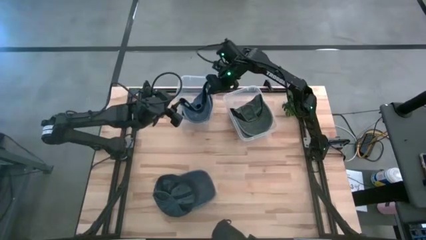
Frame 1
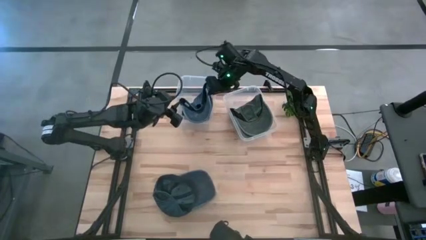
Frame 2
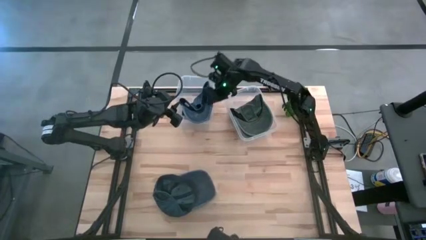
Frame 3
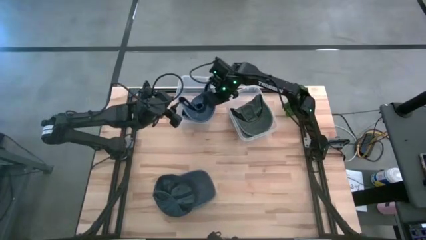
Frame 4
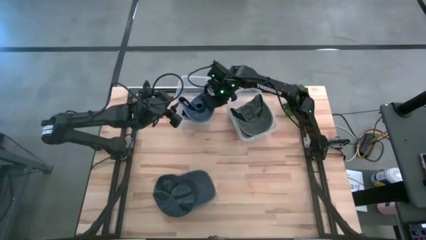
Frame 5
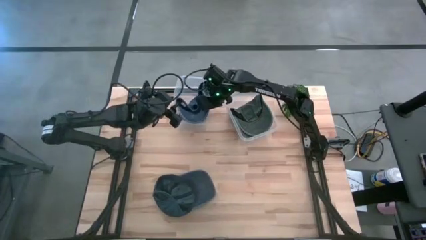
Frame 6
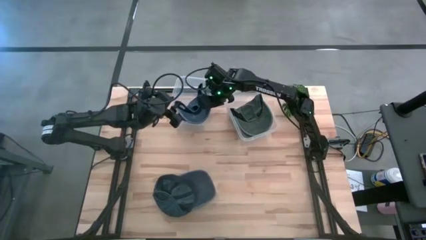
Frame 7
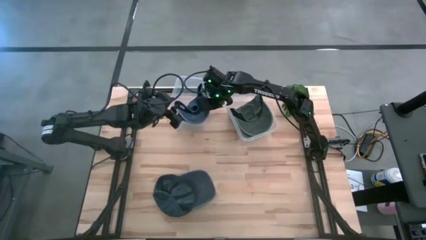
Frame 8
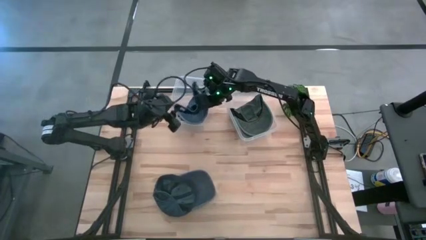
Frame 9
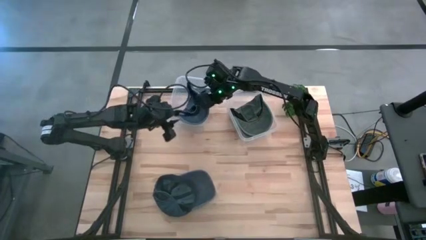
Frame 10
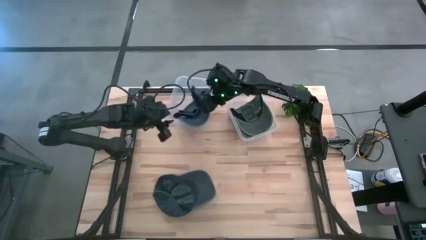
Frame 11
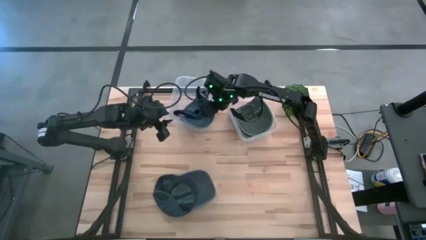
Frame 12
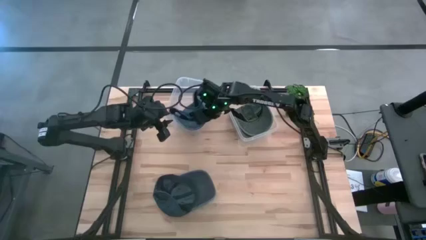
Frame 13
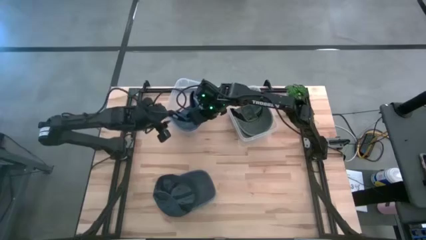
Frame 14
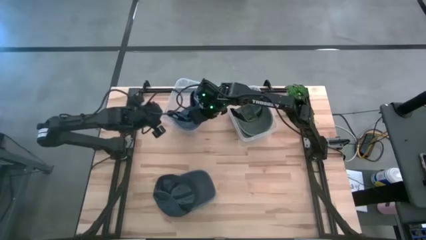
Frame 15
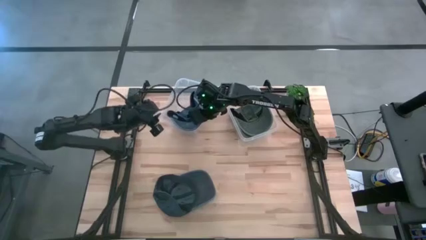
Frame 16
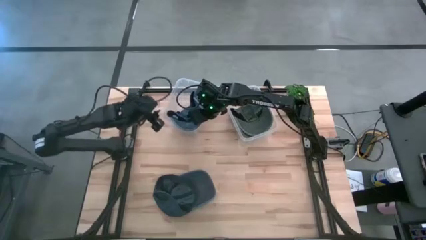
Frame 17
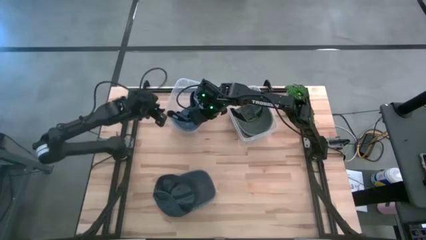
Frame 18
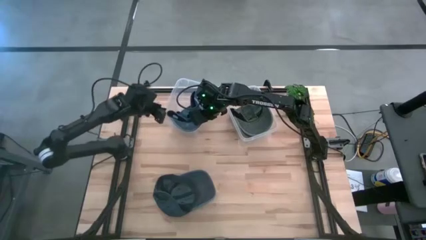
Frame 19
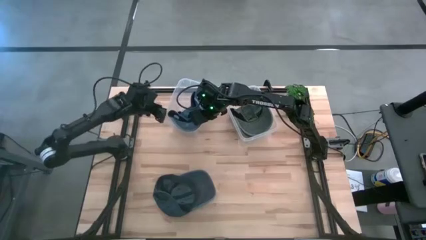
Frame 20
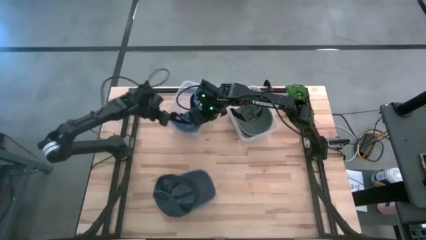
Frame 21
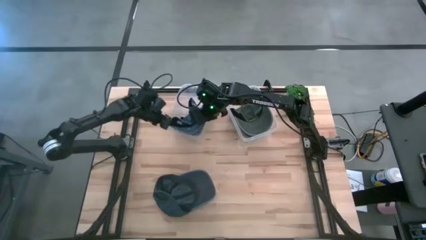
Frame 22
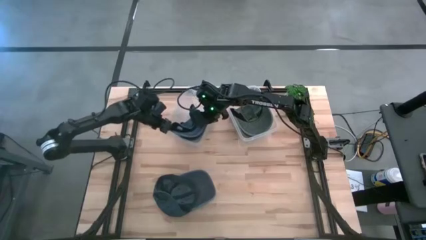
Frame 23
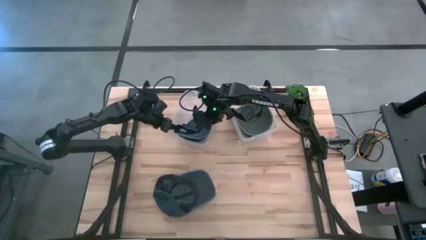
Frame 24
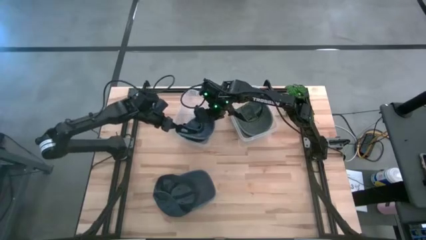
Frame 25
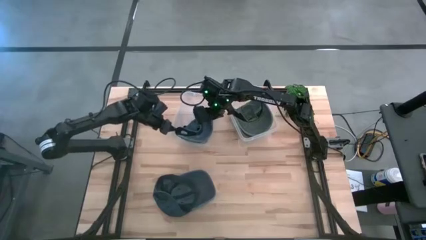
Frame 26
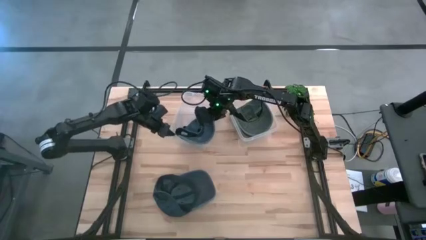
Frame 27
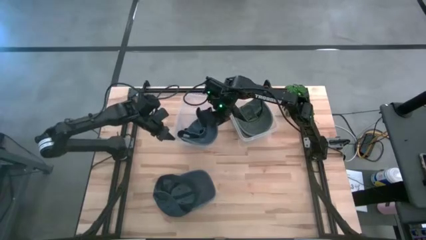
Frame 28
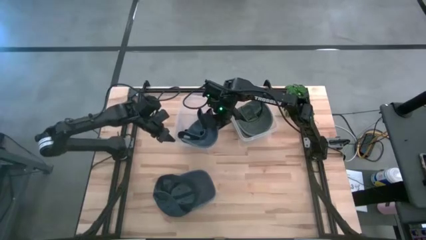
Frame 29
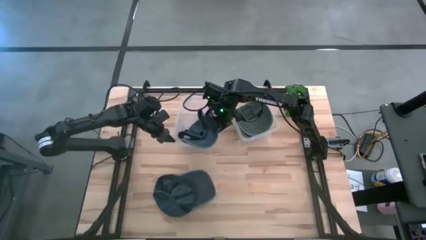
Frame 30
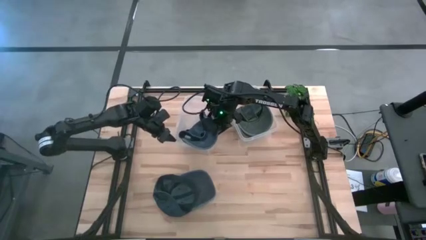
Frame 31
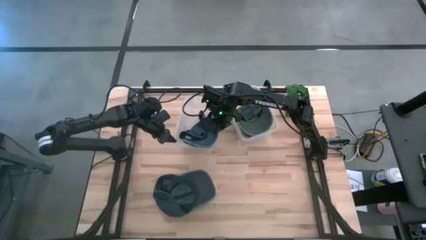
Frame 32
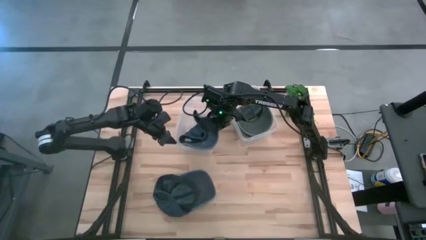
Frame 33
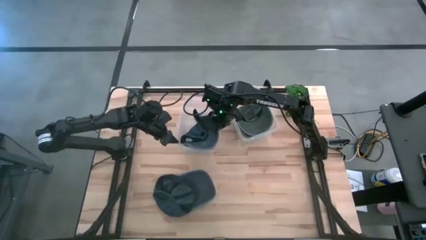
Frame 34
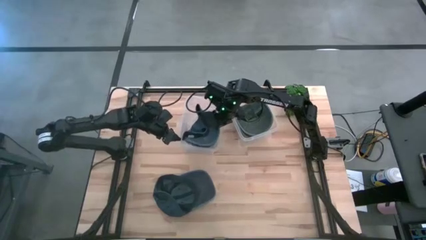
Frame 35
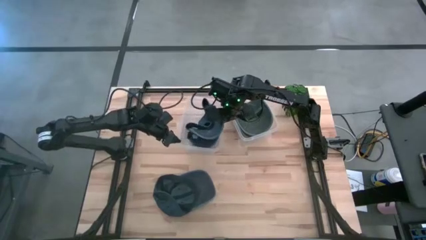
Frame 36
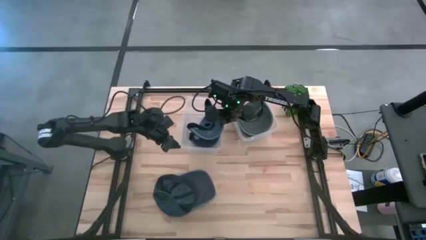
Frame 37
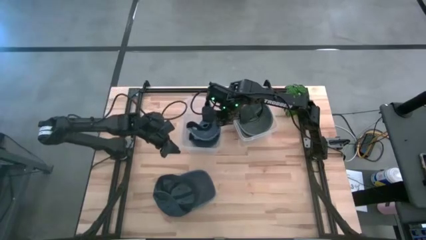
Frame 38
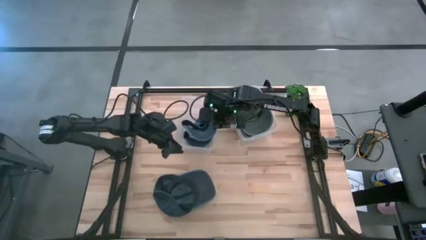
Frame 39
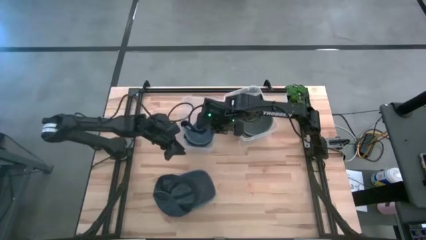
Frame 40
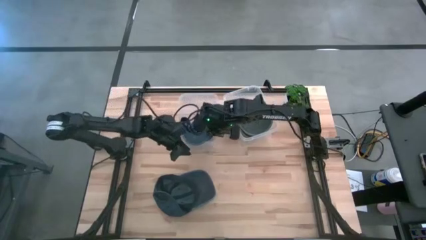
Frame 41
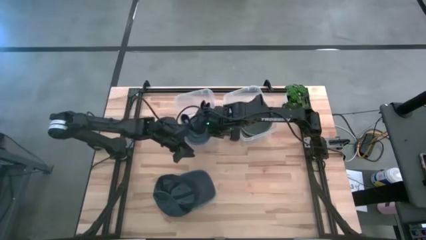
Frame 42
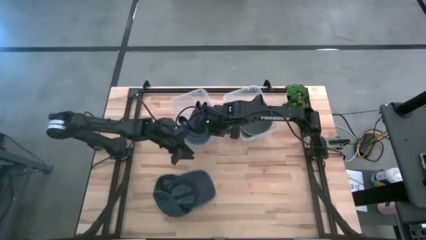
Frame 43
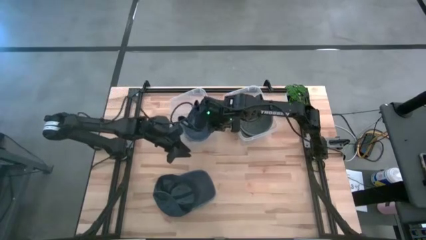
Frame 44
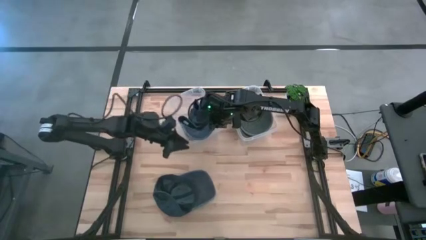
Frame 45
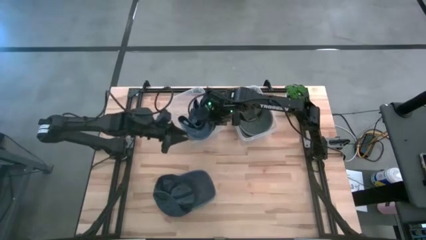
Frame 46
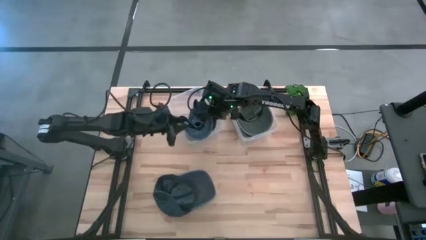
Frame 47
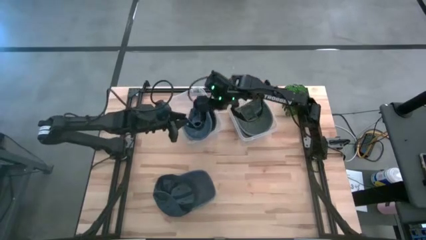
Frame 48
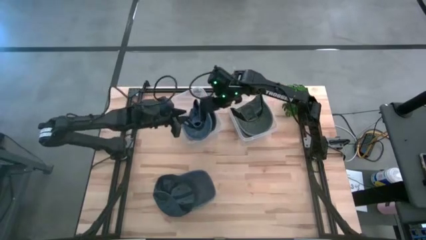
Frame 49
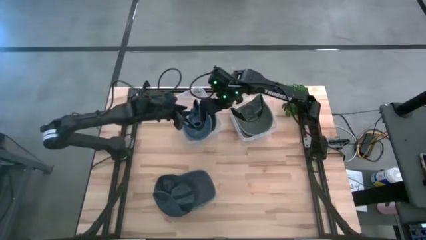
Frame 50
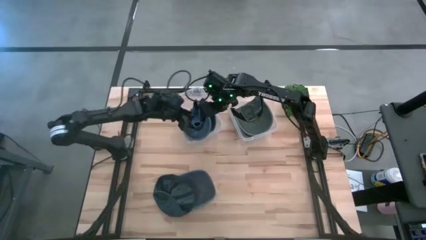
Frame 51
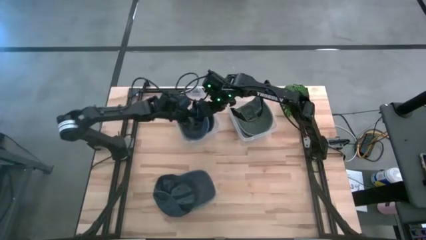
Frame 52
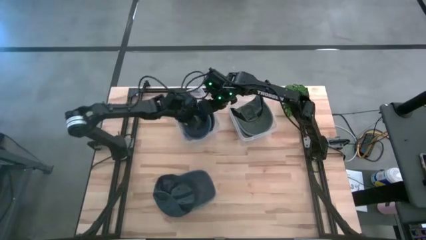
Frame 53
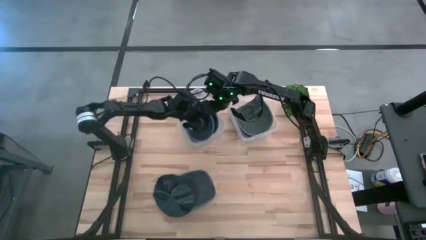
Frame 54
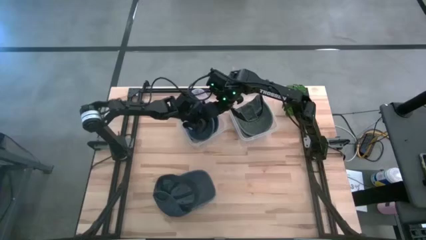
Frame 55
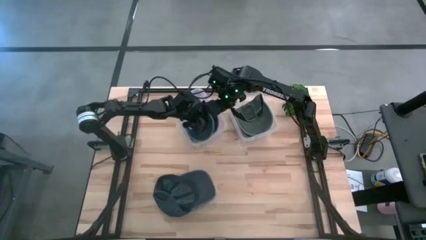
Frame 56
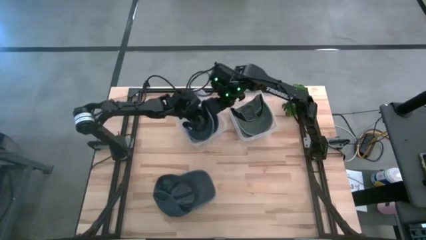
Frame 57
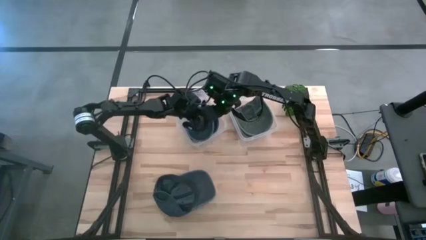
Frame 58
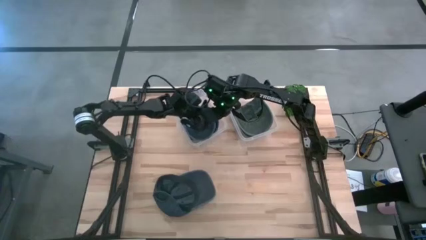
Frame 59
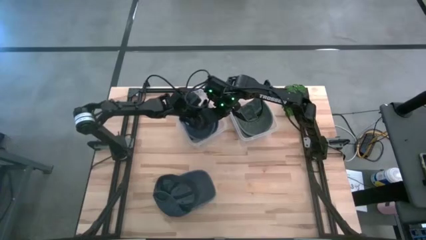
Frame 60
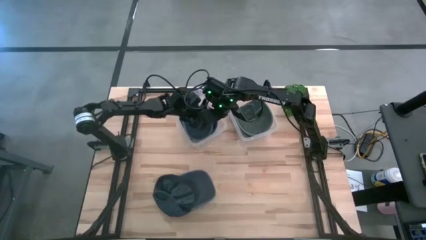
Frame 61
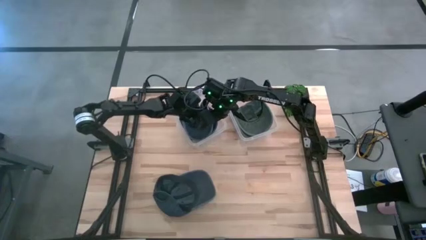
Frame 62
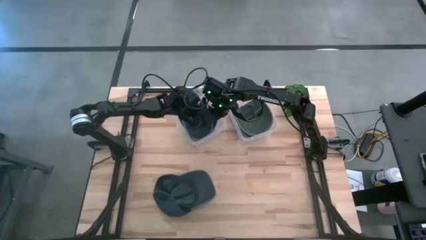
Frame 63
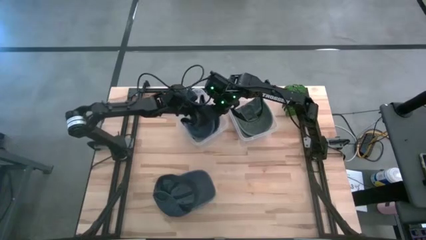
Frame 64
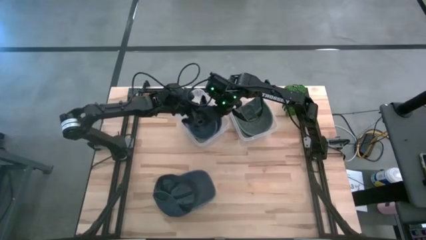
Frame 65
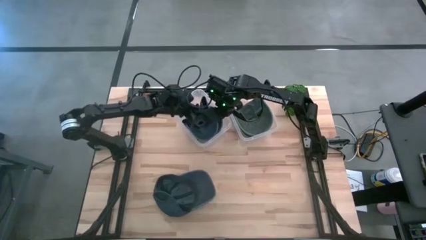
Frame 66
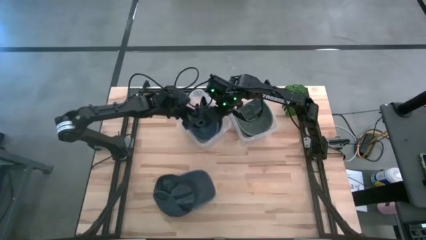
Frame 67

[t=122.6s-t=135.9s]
Task: Pick & Place hat
Put the right blue cap into the left bin

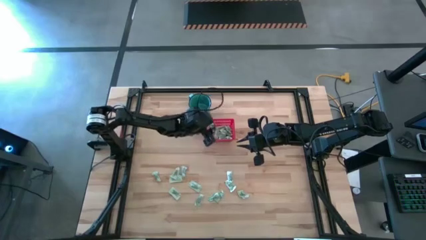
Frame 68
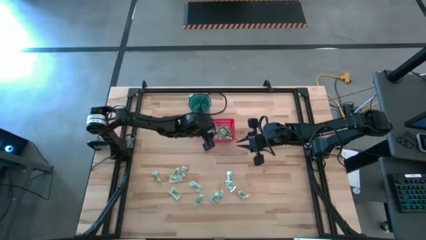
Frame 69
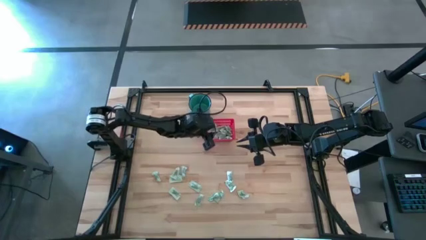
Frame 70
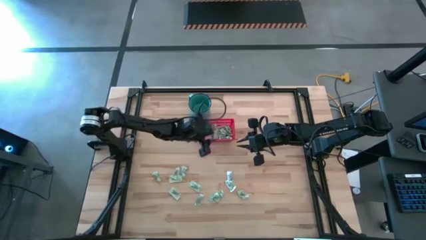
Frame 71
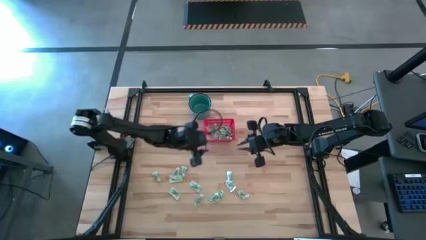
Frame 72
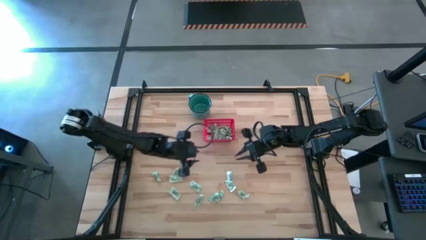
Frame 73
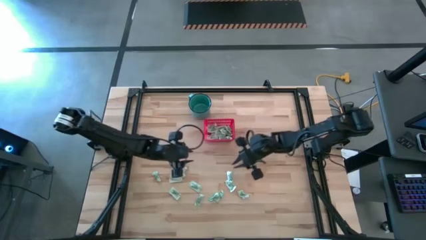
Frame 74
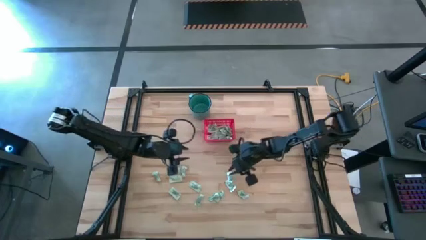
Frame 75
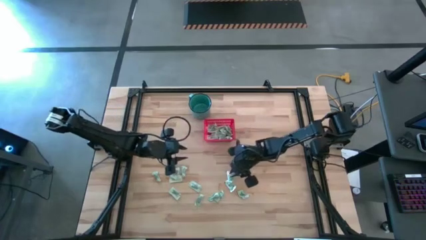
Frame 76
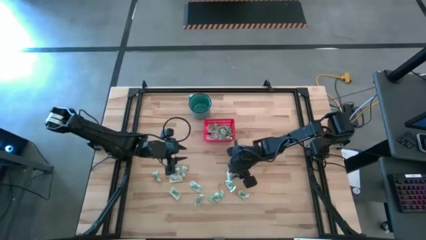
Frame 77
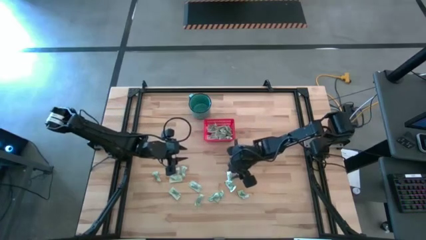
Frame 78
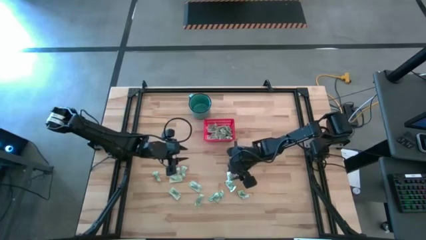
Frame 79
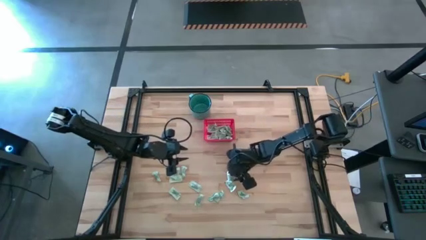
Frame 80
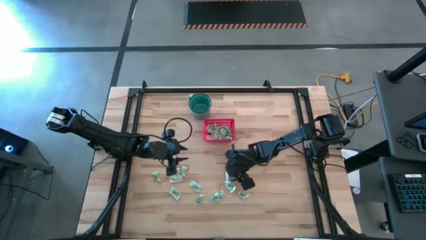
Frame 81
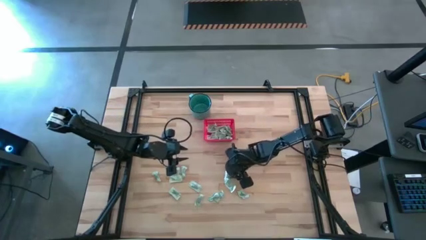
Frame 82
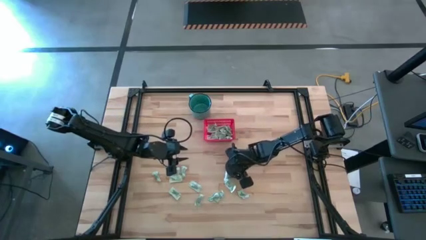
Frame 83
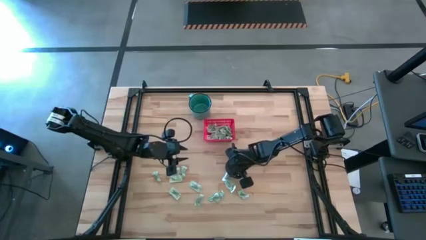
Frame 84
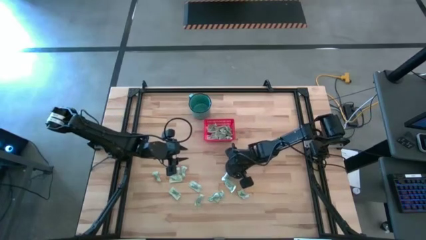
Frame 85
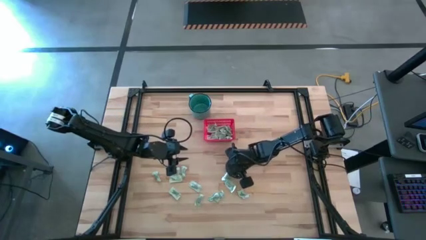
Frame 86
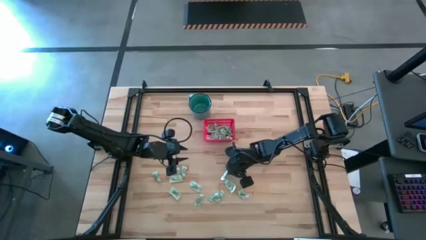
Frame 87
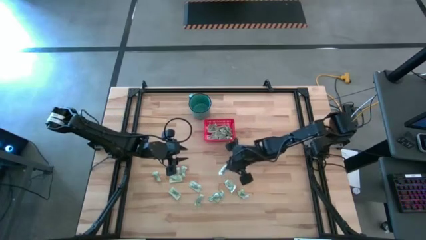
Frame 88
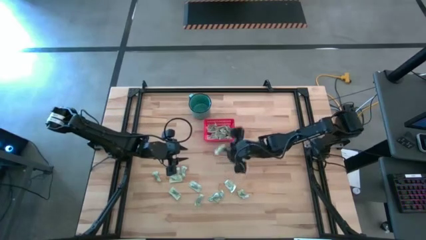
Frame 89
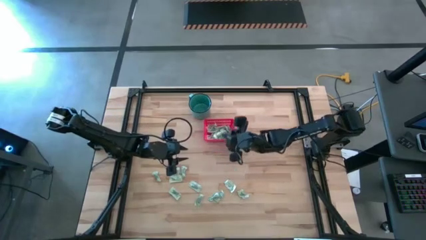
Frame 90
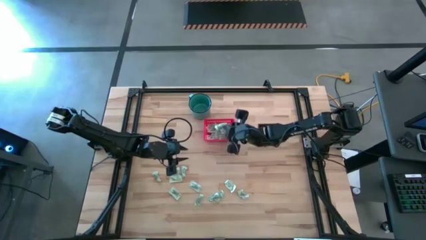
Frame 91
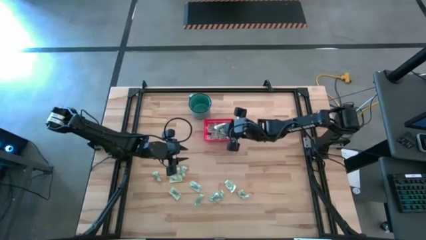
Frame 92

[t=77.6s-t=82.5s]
Task: Pick and place items into bin
Put the light green stevia packet into the red bin
